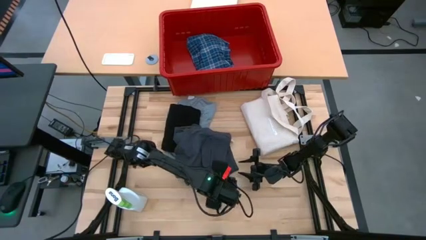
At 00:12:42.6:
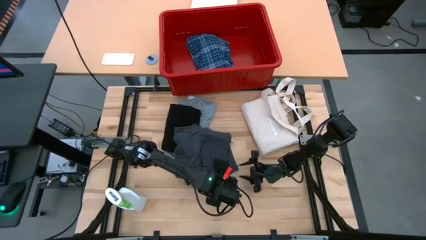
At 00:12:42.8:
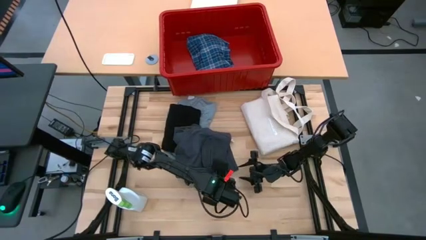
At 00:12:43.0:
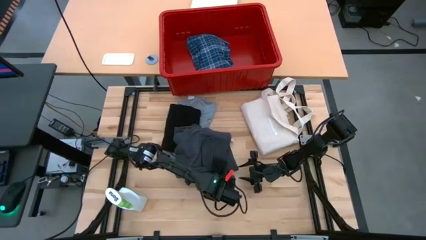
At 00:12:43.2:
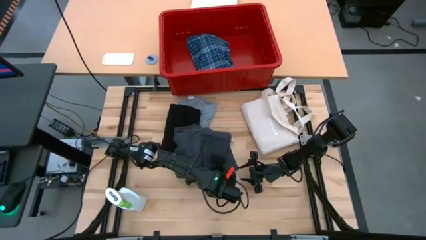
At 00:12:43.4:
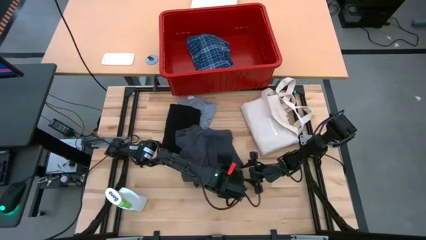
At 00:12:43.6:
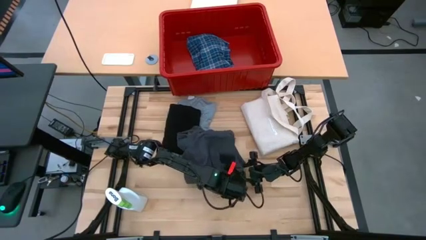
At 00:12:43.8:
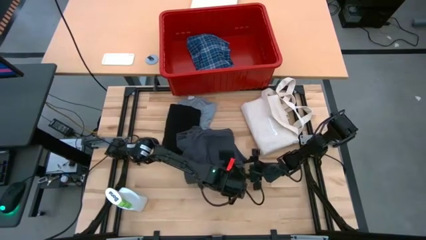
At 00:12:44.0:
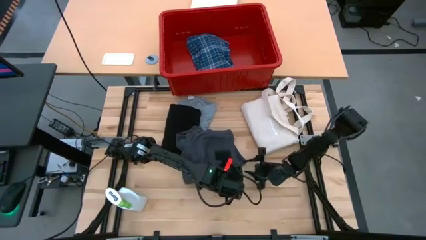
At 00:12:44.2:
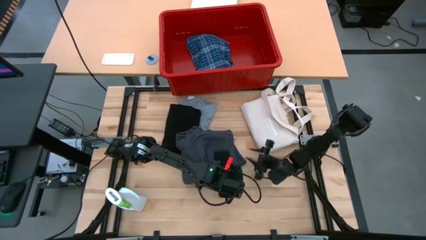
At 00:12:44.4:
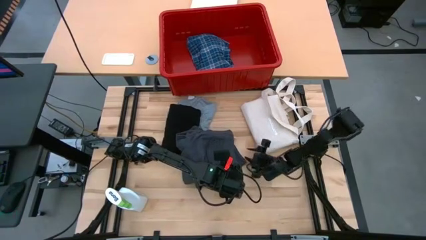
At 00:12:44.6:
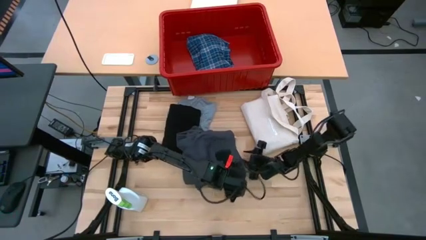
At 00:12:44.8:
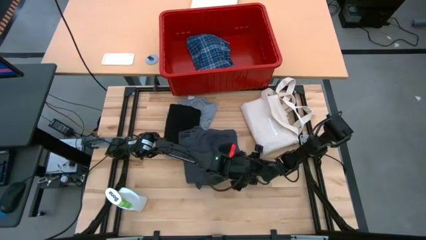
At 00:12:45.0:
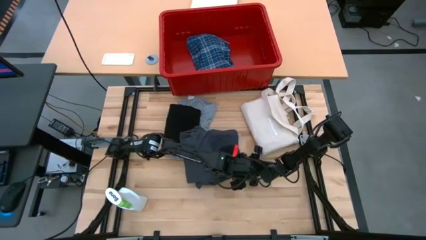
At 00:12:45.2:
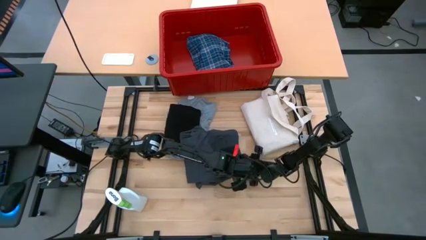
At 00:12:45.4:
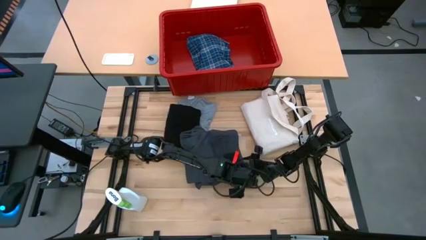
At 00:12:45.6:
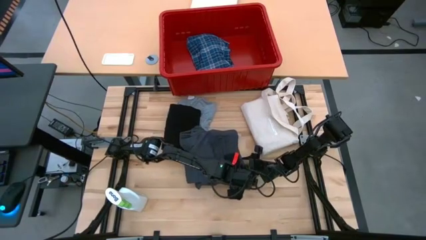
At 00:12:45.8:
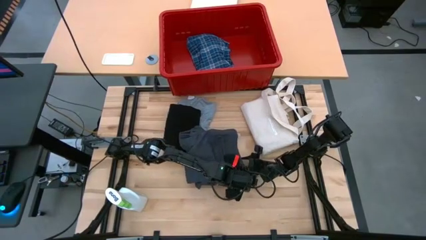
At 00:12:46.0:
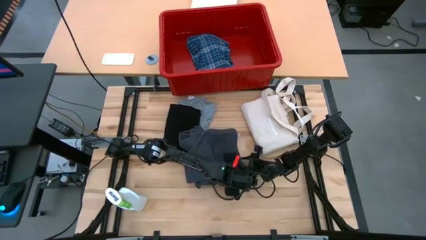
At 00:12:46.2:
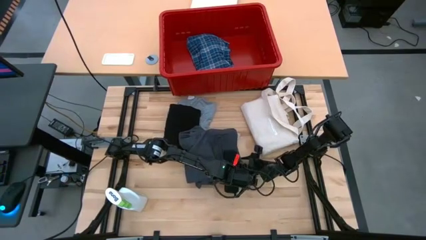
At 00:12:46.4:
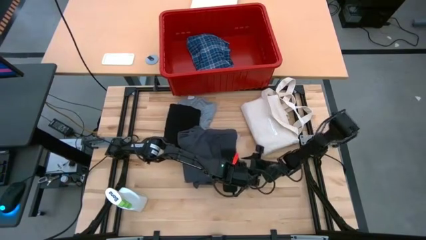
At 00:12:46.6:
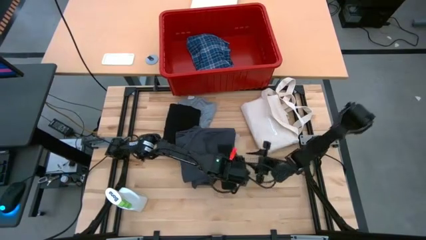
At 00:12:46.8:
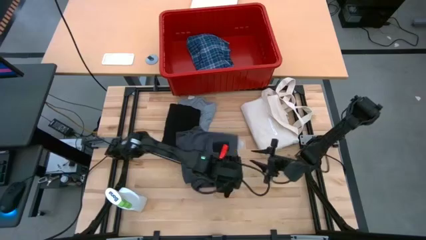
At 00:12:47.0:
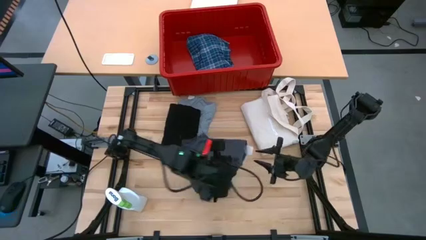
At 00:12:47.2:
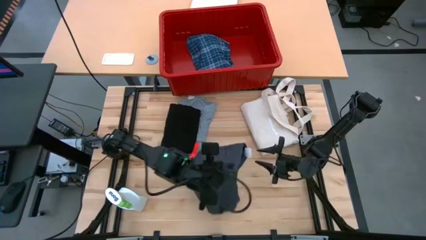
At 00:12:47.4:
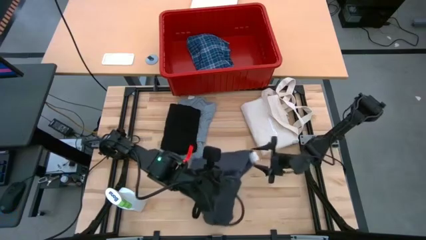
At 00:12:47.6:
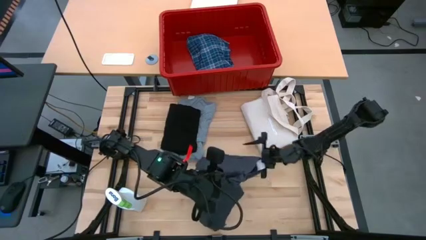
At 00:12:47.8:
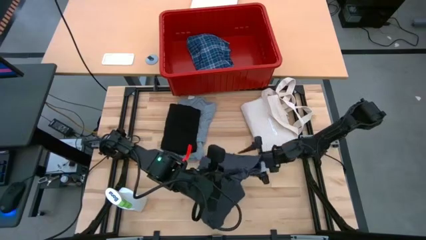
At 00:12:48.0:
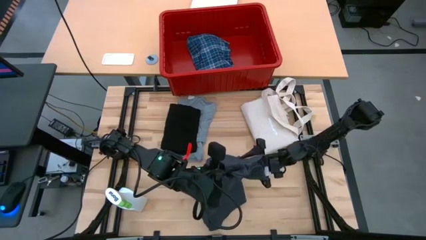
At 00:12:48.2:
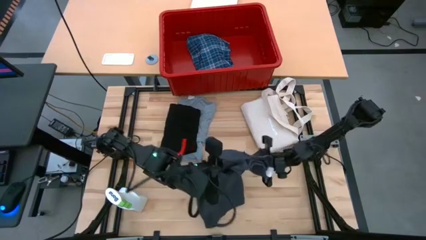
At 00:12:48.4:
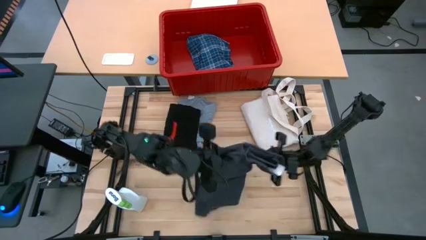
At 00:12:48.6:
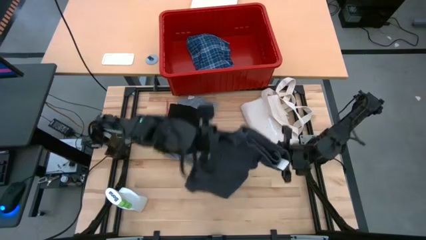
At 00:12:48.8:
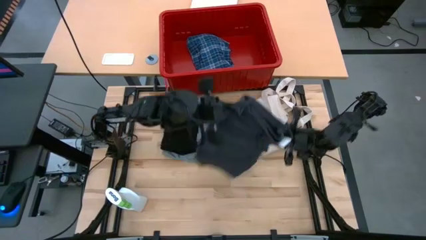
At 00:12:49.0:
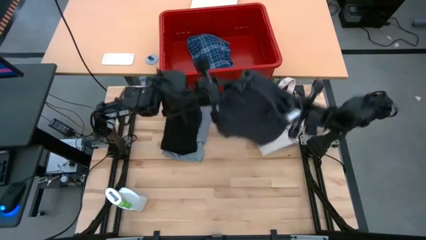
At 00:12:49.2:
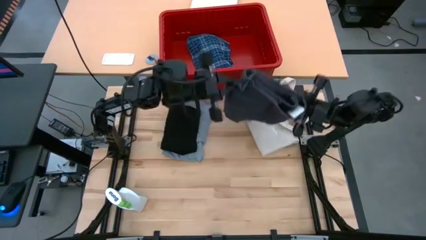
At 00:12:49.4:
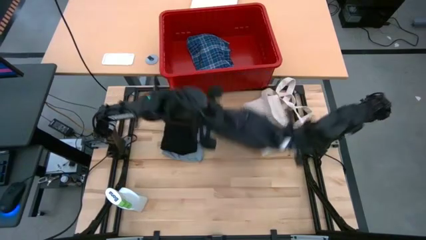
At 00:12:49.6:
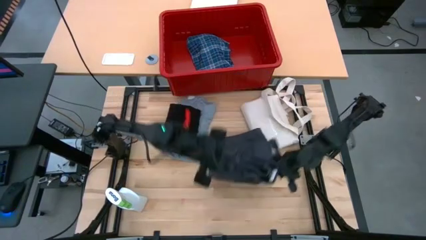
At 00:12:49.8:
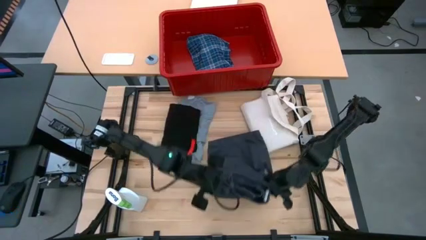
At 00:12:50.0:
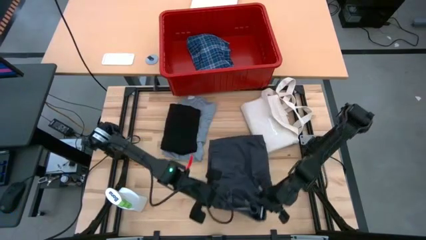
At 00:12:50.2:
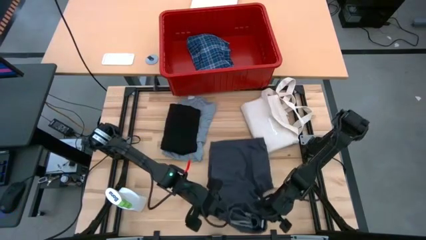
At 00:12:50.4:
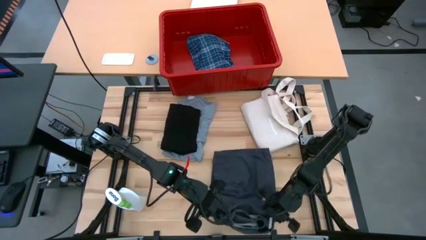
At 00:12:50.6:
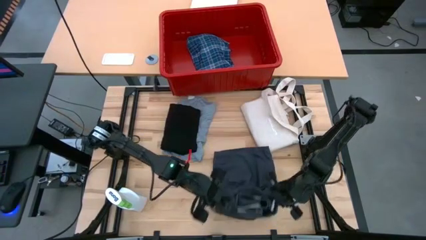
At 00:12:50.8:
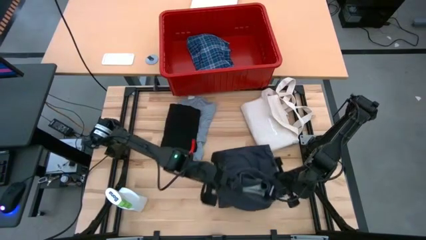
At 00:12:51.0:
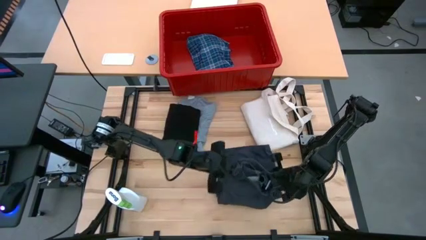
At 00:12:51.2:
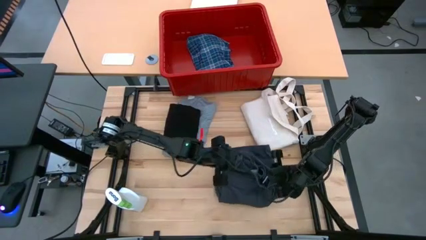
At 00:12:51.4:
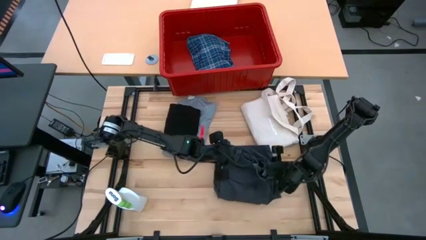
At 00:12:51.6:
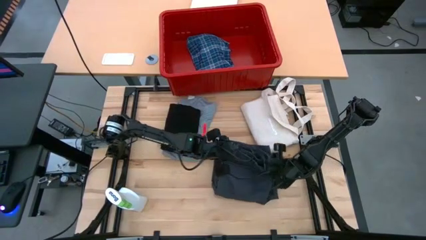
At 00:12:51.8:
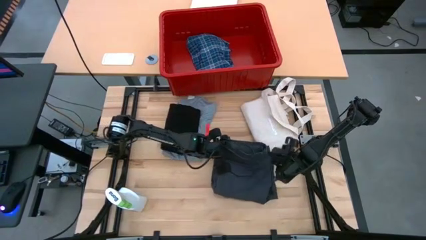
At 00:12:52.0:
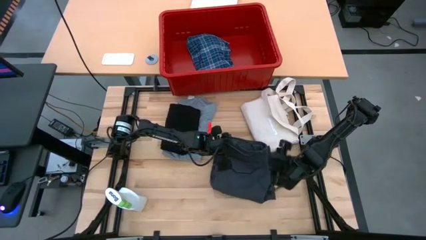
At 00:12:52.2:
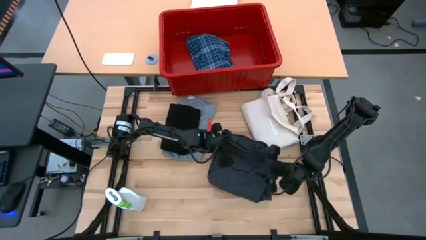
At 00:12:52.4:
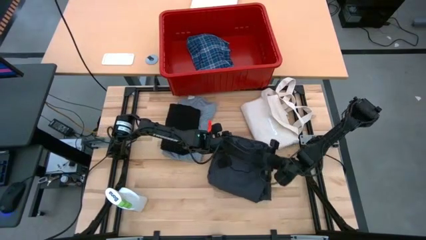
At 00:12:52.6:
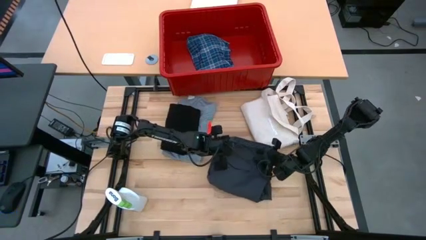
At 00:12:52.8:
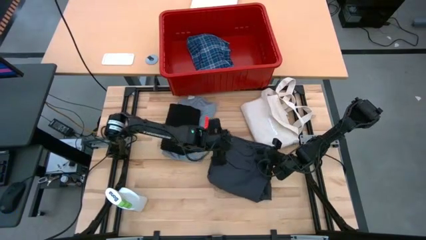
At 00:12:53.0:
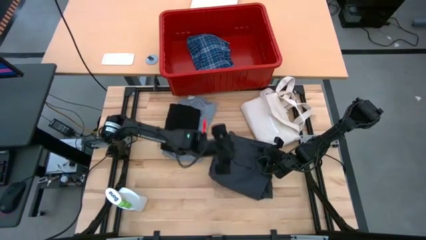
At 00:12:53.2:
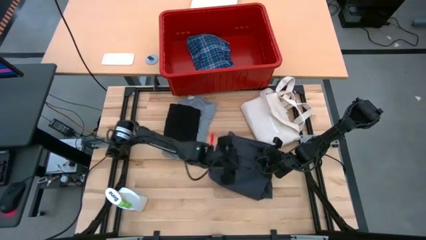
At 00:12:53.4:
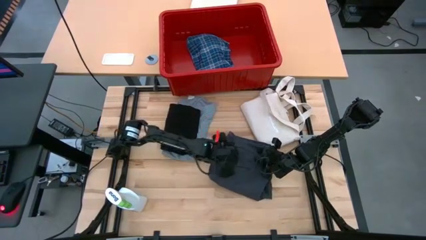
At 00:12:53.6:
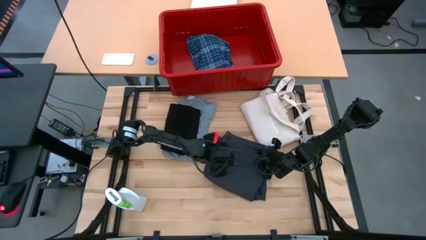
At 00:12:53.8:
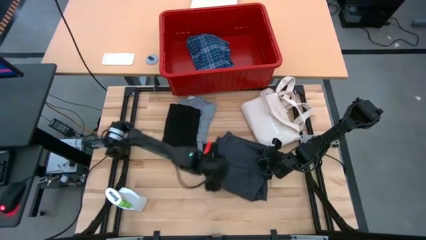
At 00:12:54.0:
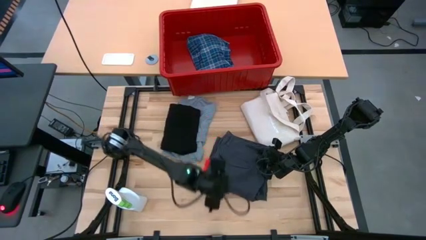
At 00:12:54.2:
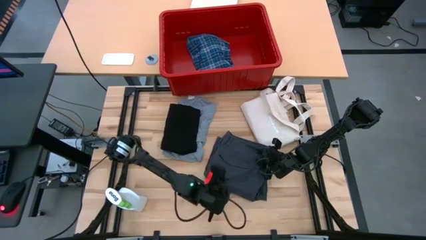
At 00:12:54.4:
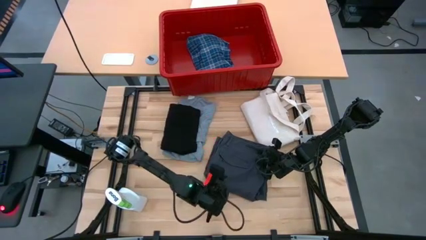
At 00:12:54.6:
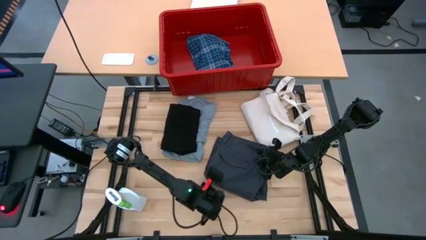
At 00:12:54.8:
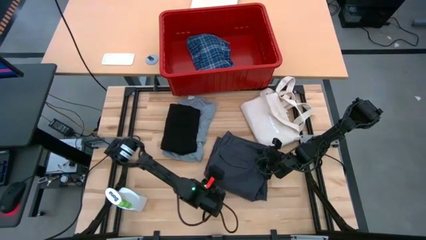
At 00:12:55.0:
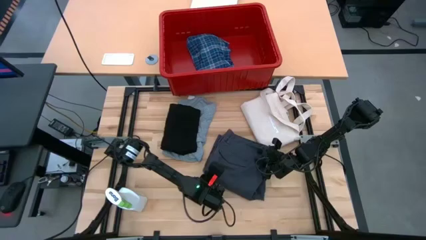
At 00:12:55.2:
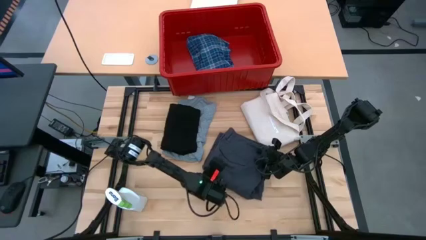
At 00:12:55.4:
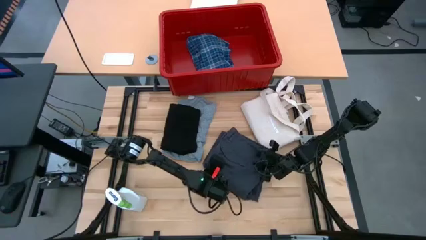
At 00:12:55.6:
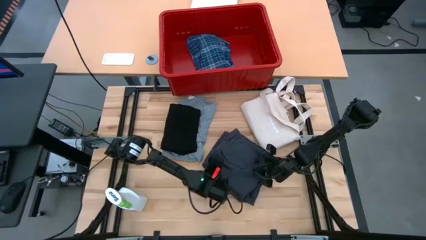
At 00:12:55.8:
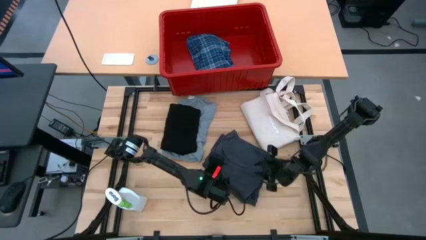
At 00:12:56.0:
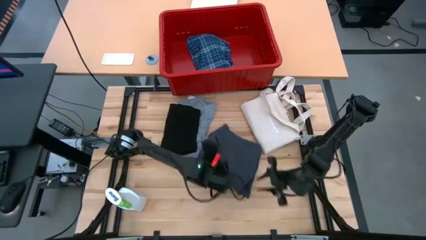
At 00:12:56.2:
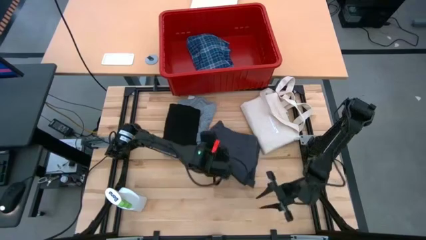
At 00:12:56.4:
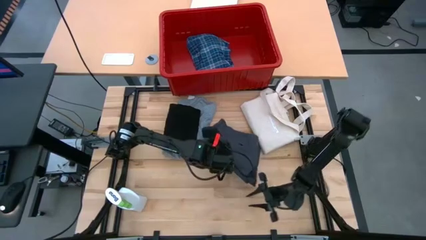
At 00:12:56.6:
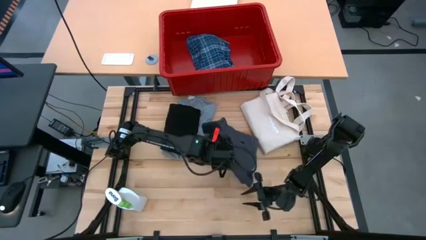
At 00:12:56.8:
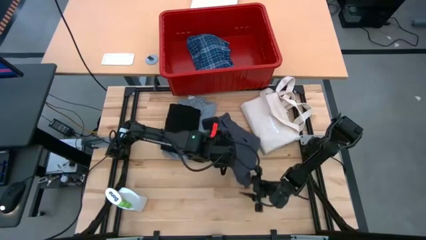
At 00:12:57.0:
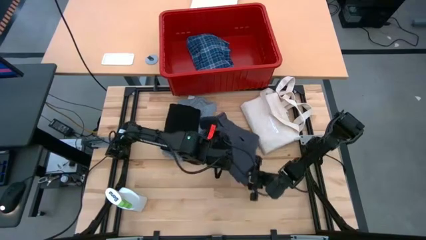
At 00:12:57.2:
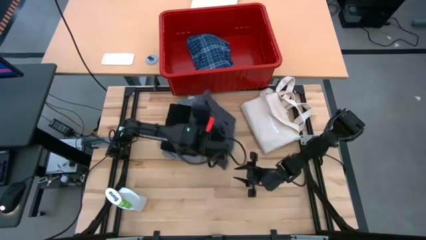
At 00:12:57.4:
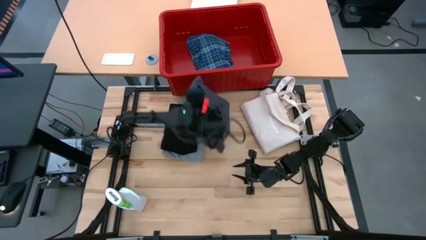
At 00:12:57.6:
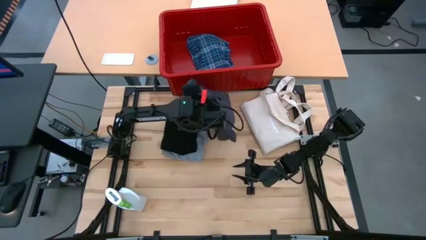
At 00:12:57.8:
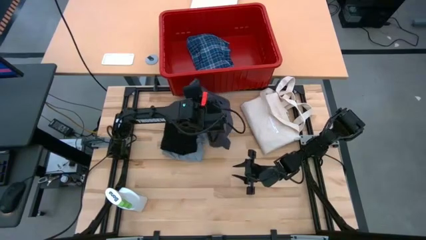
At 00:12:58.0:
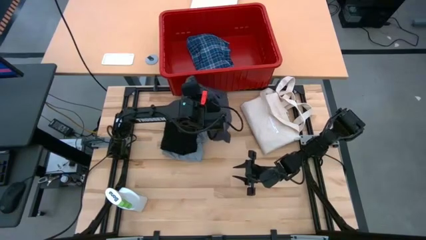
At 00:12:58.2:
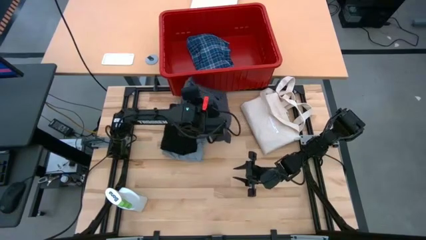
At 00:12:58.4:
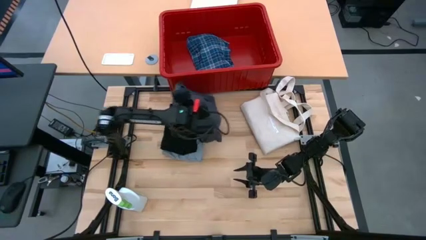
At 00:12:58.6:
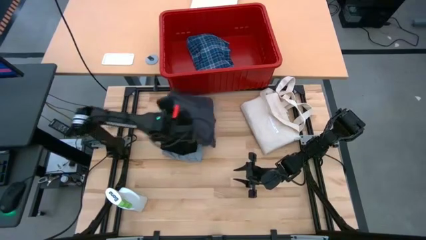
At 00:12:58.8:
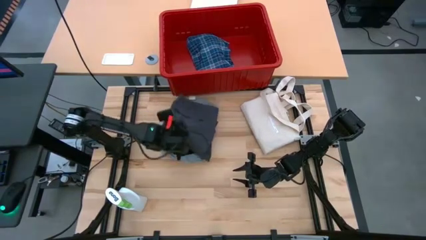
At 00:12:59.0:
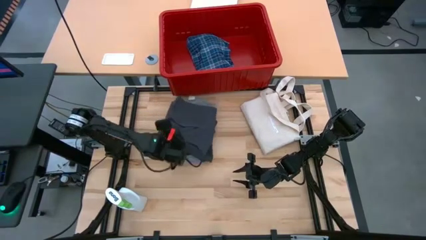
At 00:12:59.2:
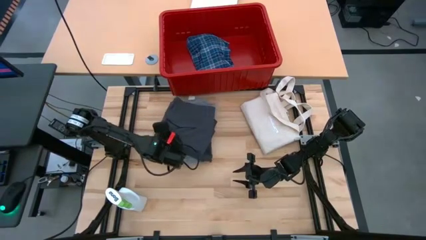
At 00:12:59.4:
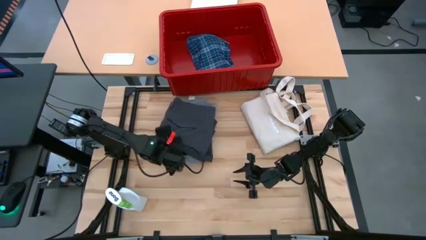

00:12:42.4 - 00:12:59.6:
Task: Fold Laundry from Bin
Fold the gray short pants
